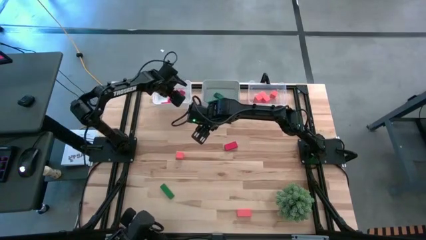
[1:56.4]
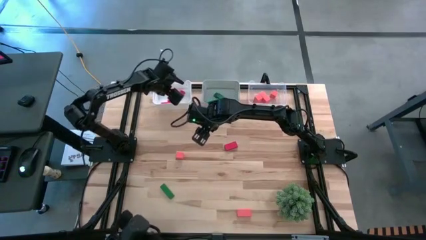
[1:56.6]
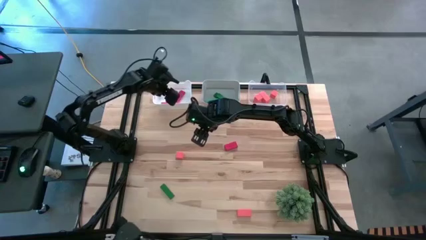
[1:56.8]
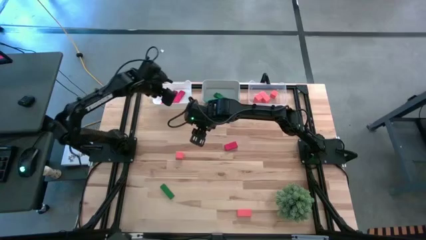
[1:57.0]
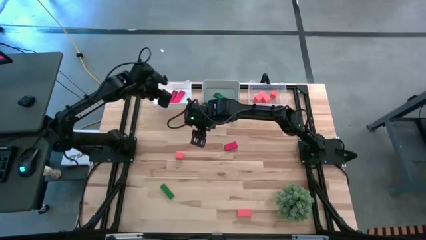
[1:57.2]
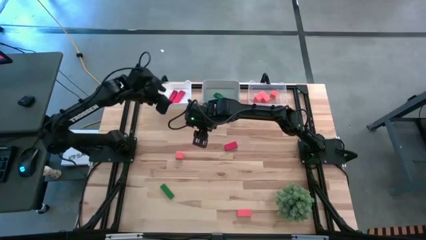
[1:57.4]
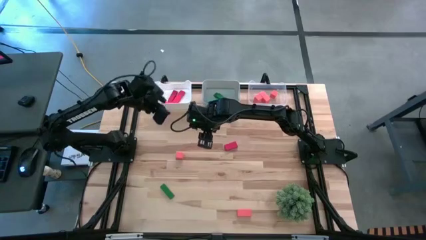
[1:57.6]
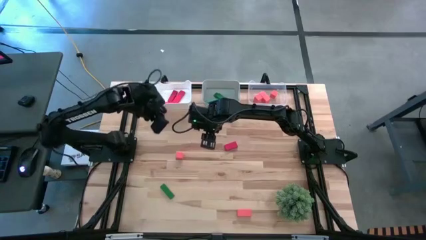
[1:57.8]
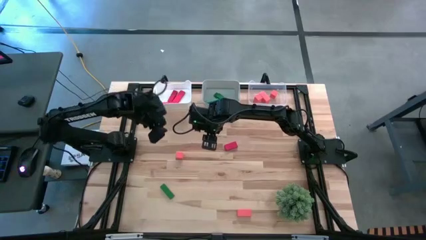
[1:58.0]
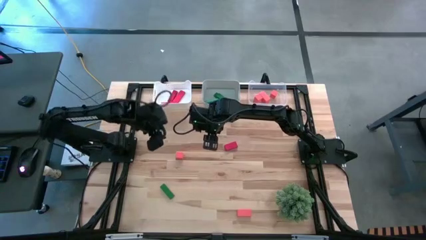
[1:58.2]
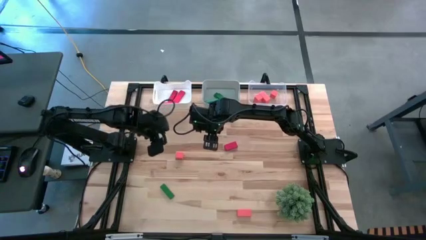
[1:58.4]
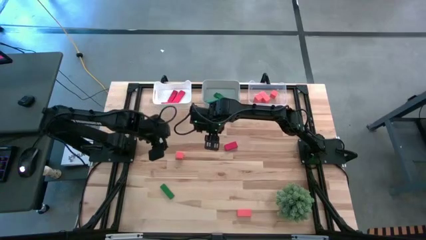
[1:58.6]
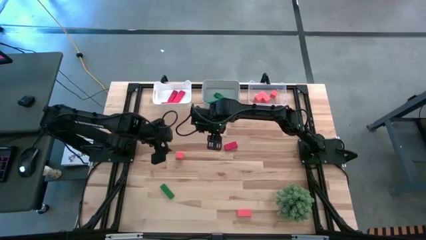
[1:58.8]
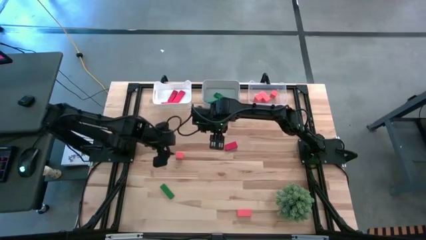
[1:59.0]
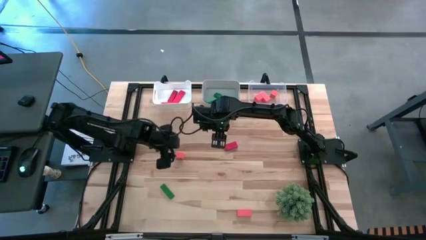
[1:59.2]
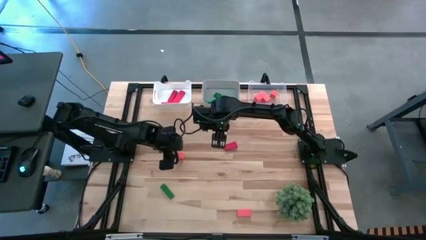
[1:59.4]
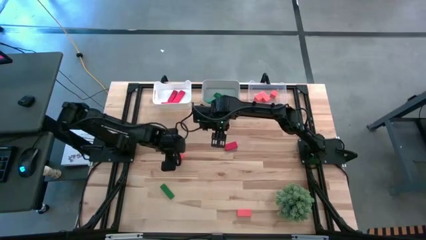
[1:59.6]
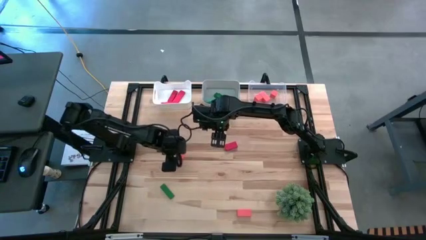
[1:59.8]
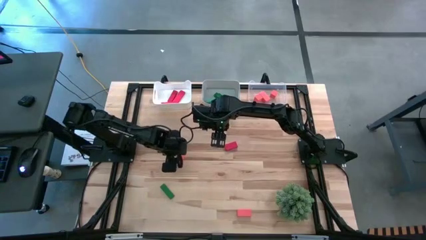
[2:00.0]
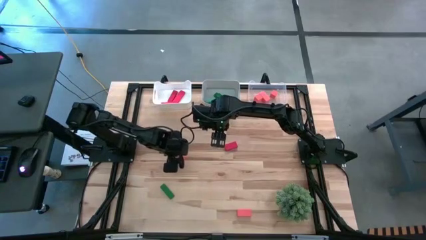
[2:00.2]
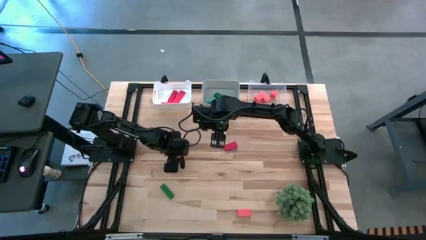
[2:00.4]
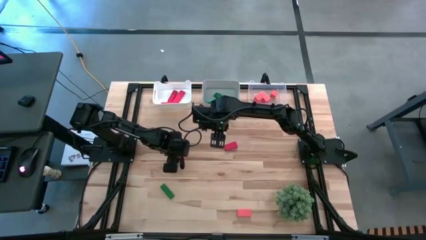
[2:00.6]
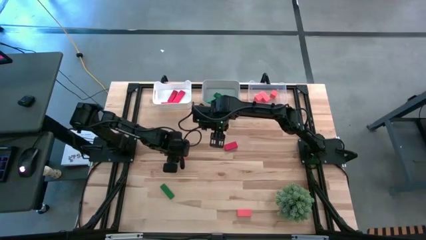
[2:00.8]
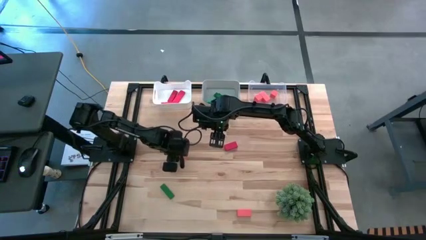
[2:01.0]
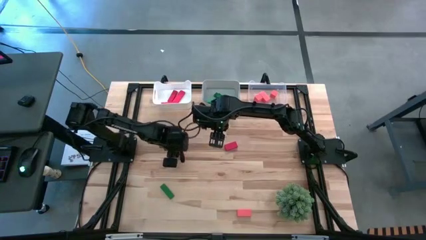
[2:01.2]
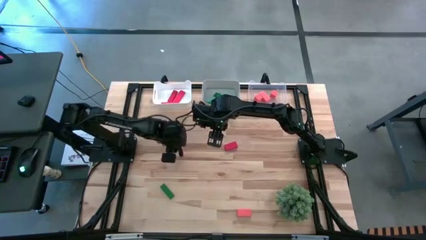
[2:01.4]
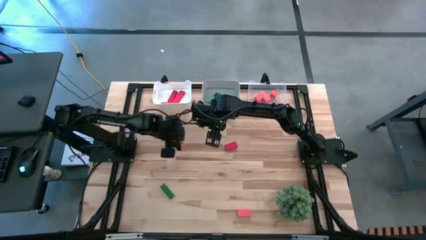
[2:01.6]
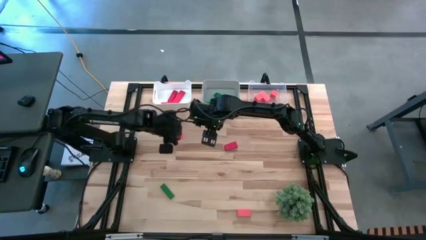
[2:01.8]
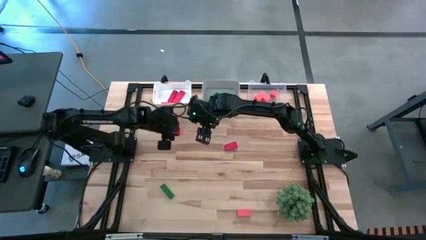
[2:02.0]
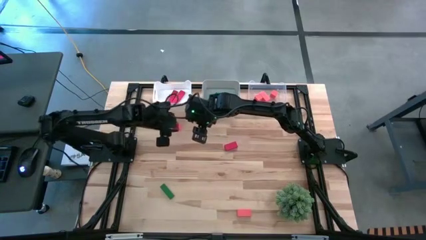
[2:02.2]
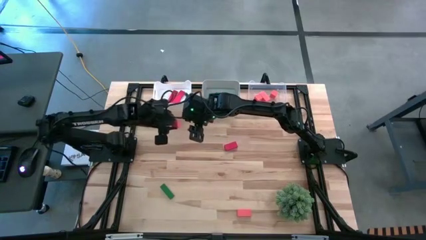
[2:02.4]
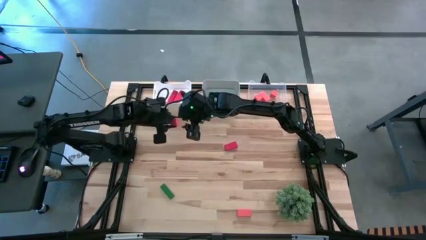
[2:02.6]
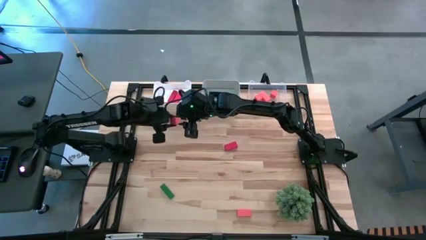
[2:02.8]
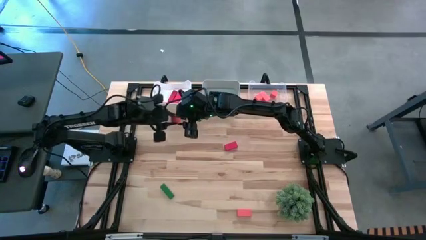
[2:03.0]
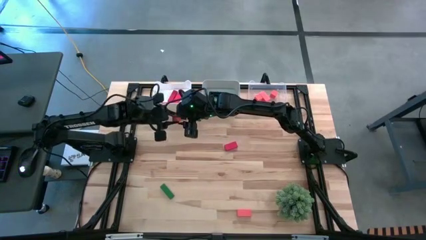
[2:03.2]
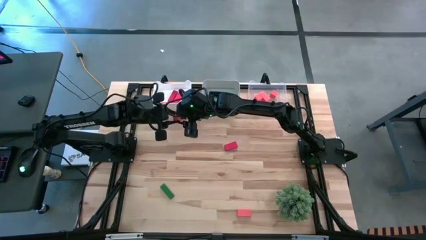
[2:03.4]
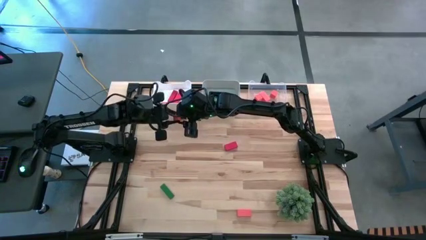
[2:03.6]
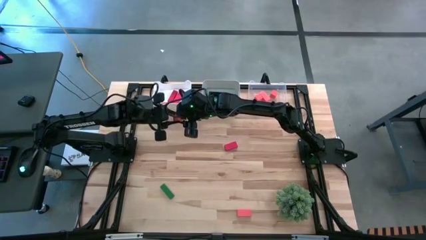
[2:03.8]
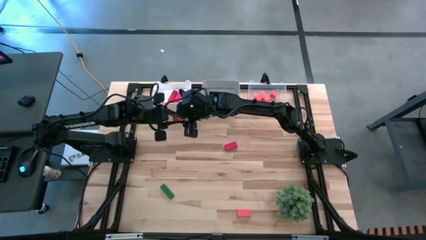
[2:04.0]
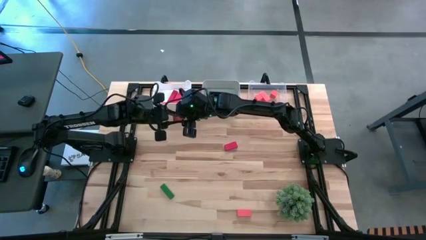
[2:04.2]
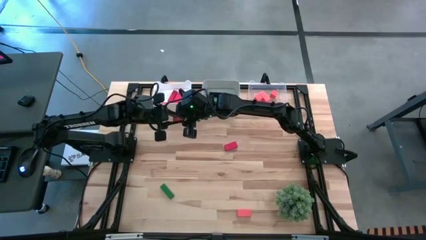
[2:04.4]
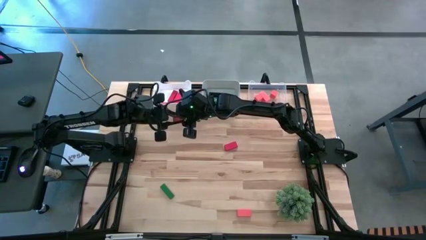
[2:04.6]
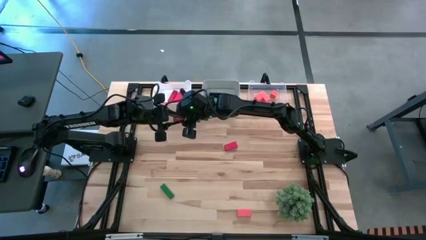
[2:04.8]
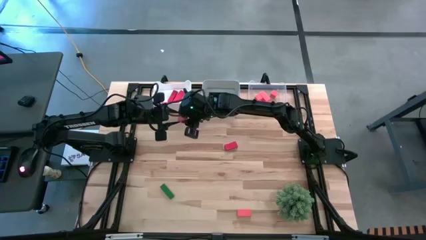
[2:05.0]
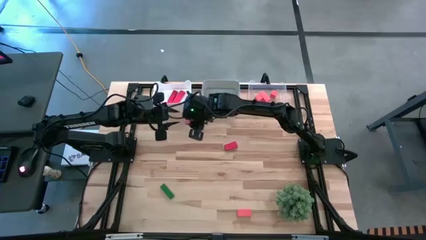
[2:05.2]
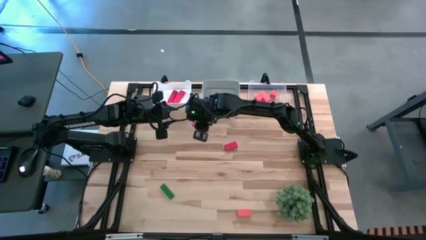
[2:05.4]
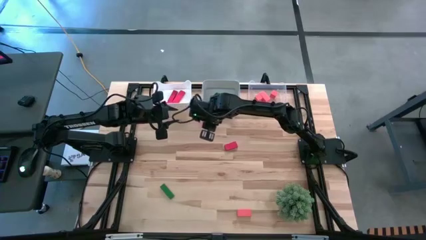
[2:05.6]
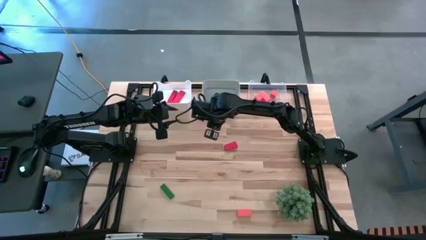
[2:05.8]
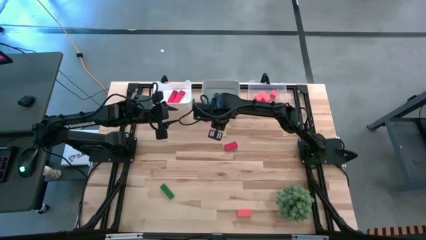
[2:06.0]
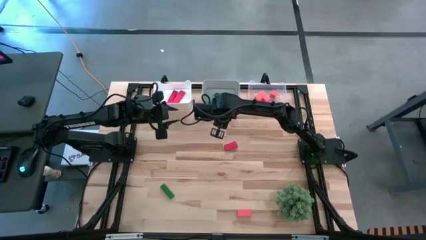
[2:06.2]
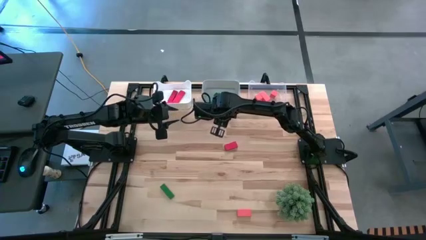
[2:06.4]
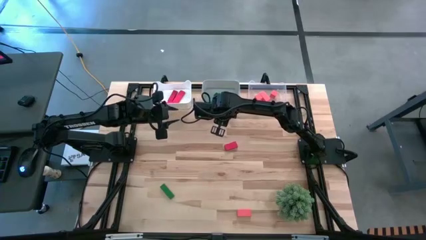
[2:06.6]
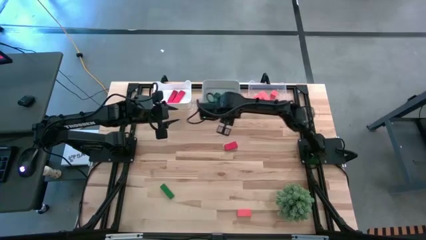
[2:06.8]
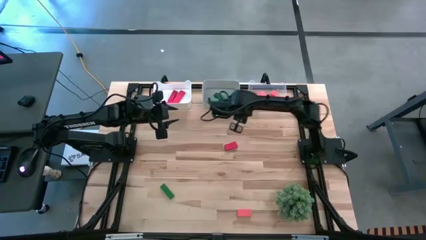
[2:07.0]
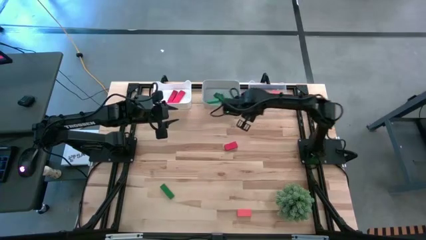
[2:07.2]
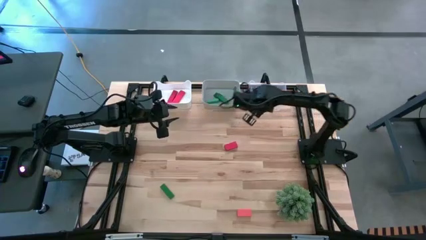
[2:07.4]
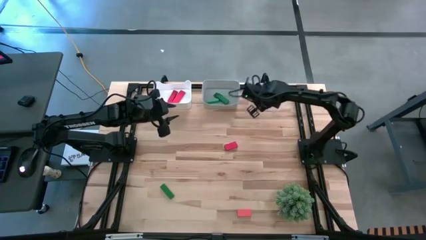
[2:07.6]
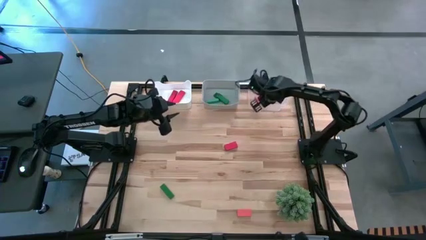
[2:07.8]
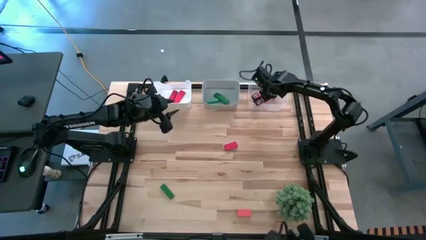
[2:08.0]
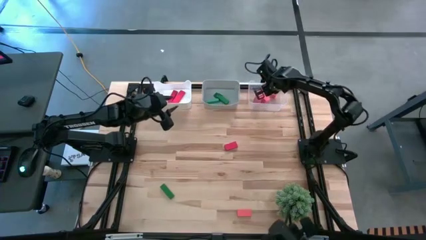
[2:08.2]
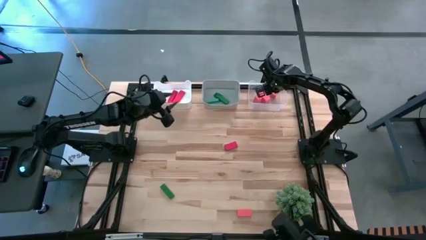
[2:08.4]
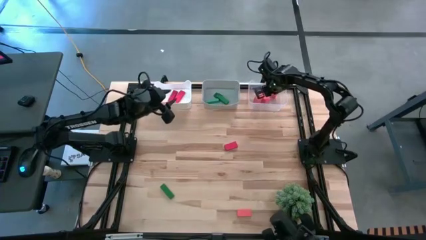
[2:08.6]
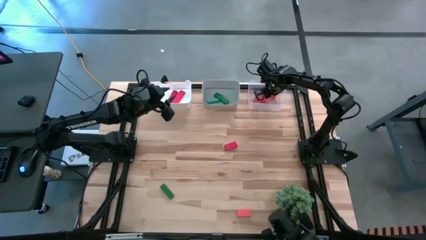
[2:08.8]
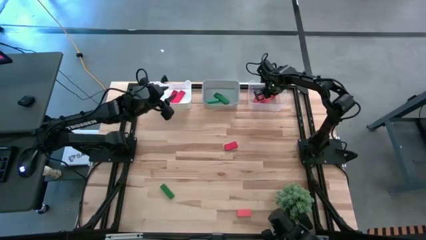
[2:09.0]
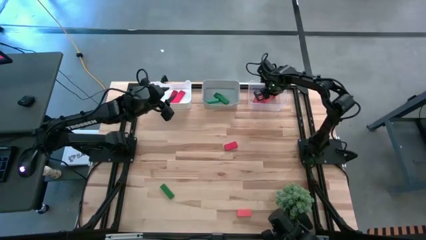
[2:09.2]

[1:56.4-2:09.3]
Task: Sort & place blocks by color
Put the top orange block into the transparent bin

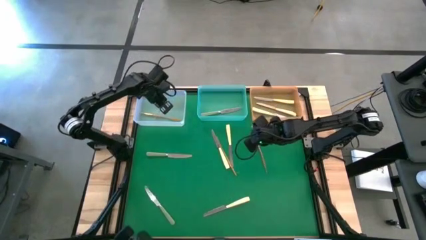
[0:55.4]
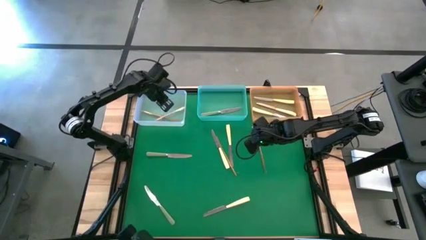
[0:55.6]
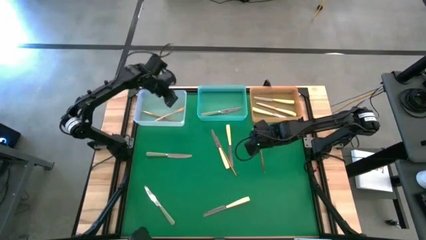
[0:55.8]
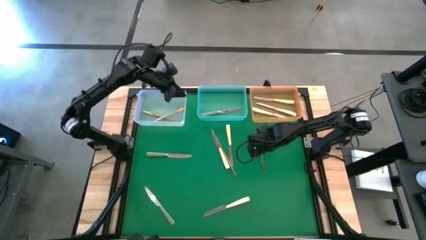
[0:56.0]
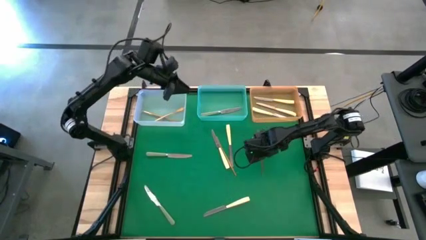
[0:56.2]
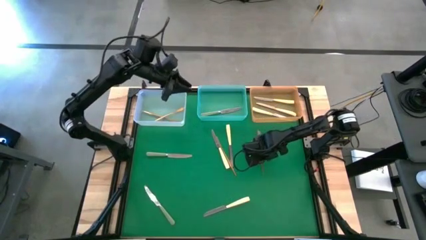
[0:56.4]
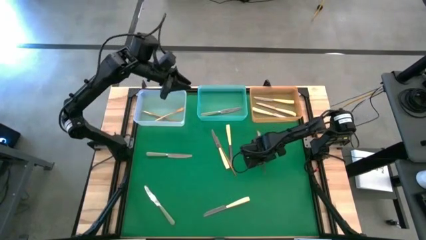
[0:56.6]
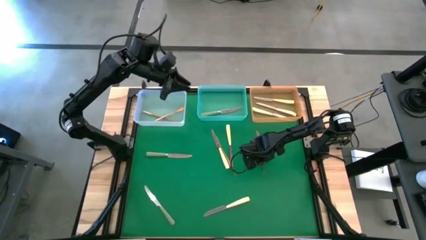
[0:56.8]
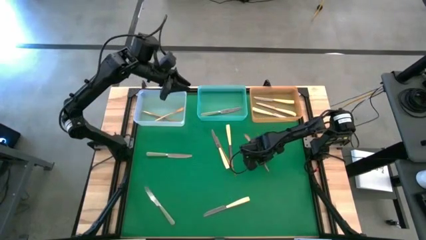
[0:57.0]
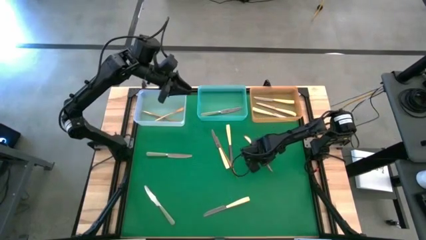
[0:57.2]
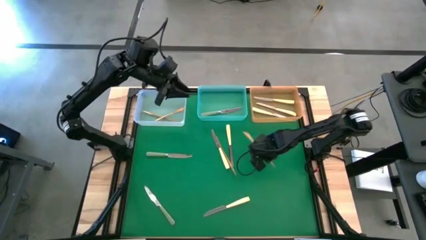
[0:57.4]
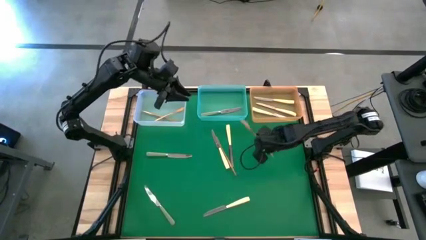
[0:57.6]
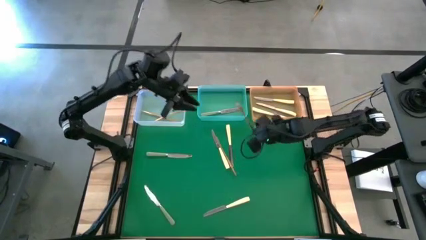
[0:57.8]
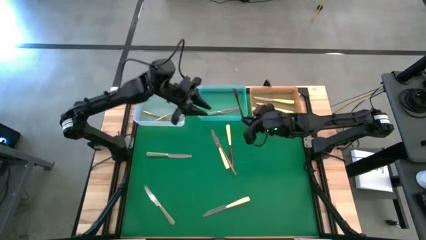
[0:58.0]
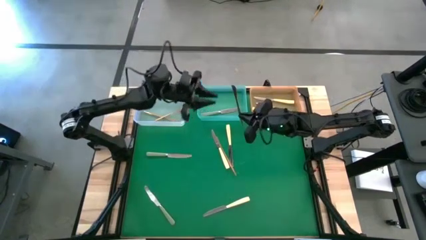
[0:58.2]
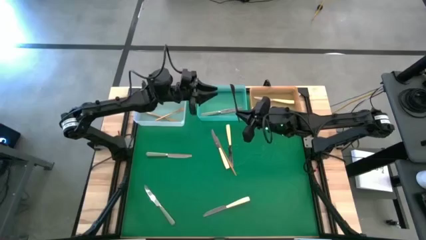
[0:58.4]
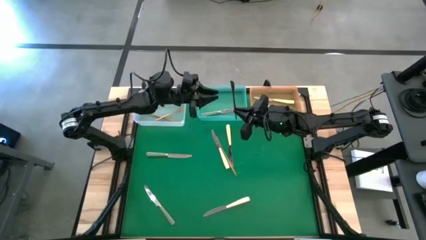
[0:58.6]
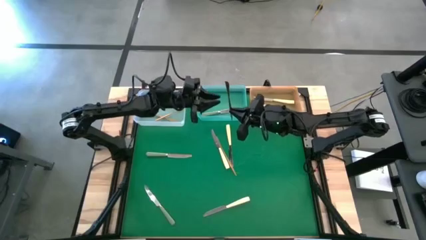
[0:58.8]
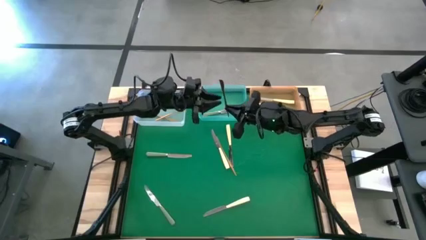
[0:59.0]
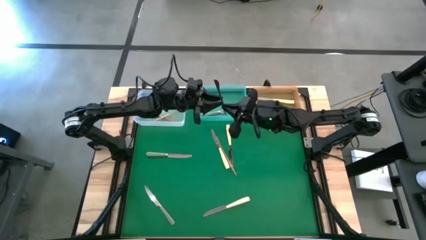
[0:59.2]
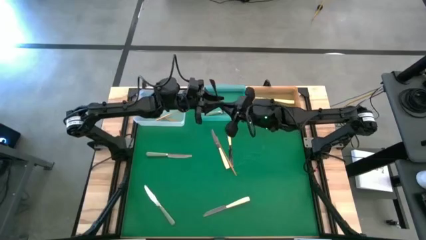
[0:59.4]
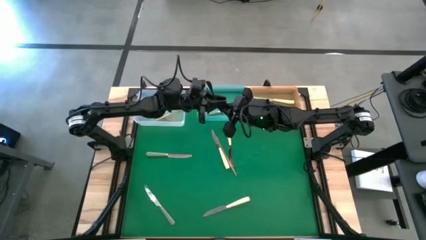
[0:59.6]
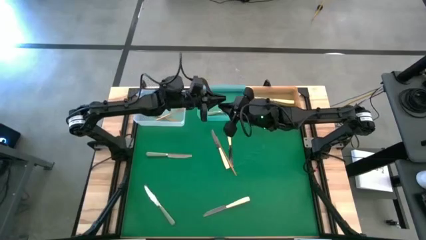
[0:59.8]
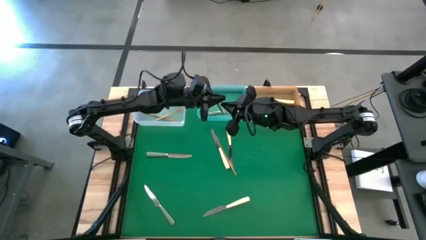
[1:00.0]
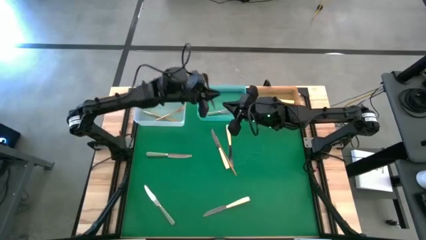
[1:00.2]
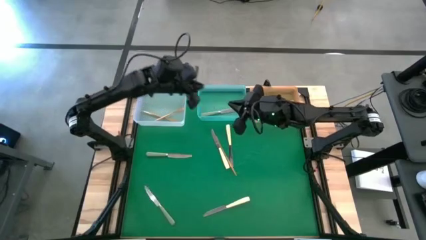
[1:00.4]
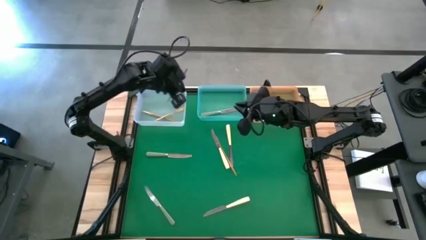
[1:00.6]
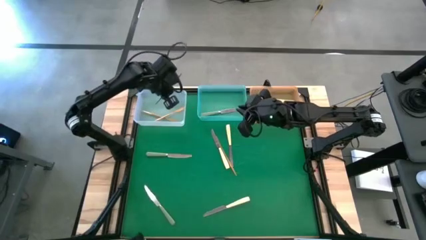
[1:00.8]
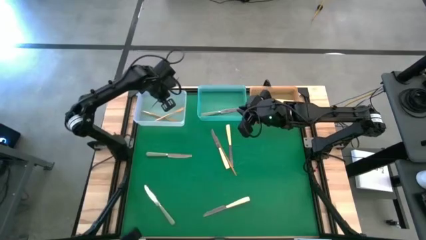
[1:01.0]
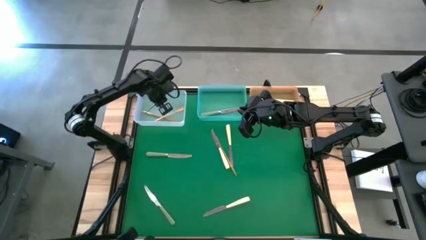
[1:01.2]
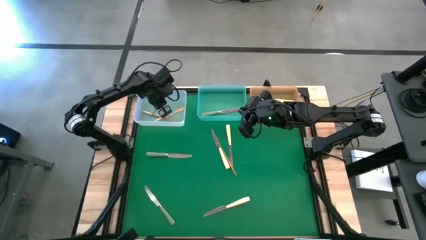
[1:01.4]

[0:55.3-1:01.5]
Task: Sort silverware by color (type)
Put the brown table knife into the white bin
